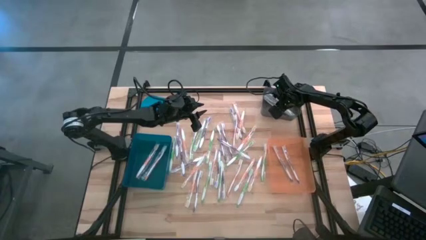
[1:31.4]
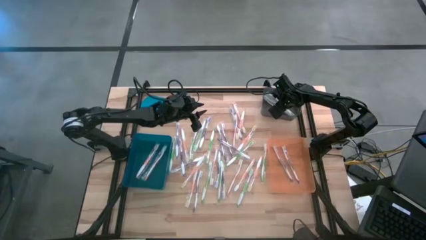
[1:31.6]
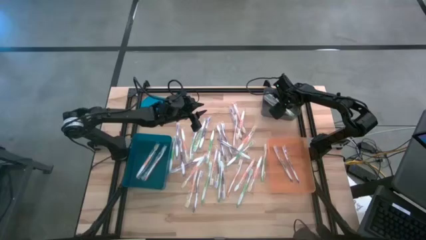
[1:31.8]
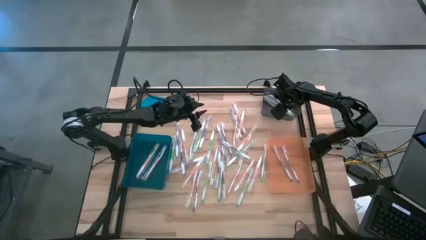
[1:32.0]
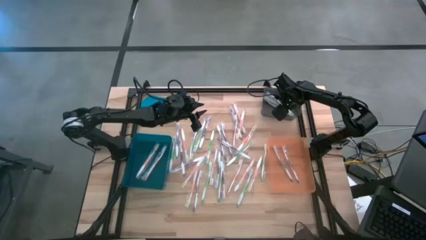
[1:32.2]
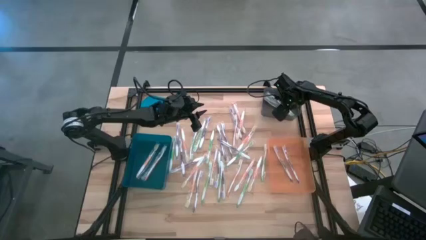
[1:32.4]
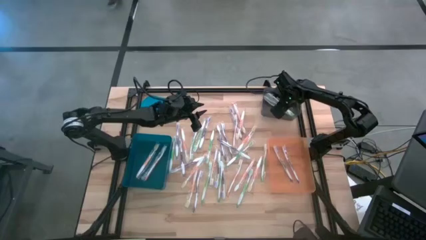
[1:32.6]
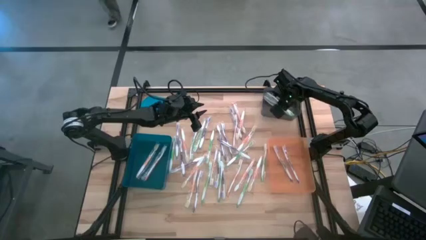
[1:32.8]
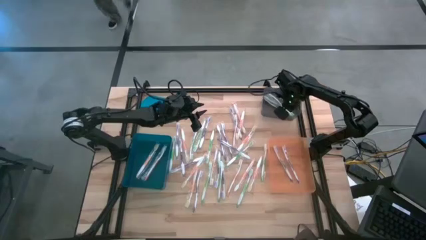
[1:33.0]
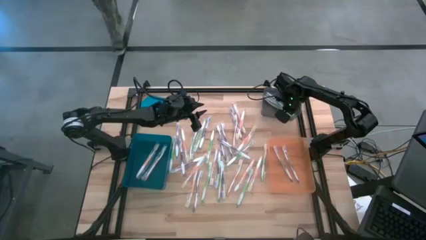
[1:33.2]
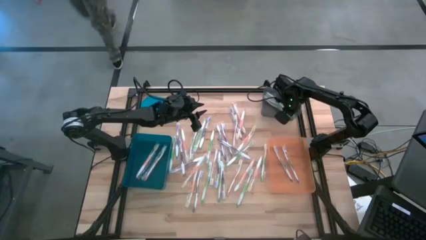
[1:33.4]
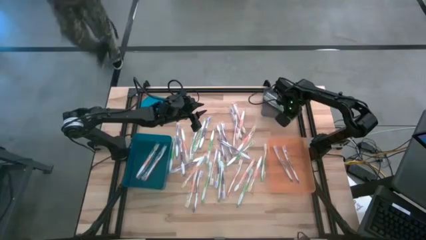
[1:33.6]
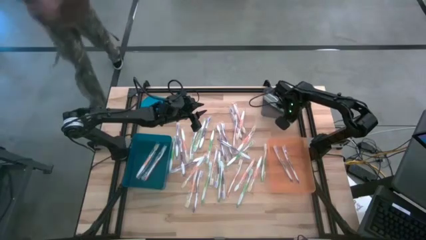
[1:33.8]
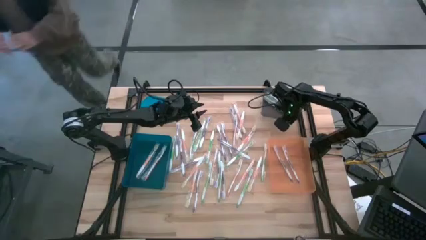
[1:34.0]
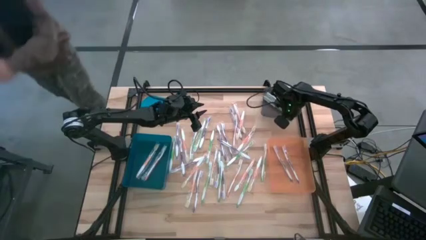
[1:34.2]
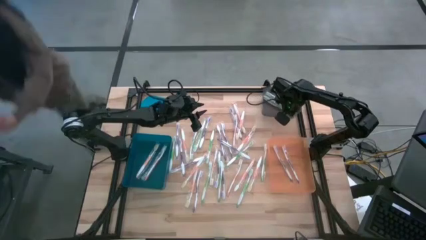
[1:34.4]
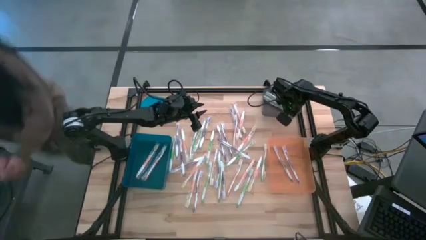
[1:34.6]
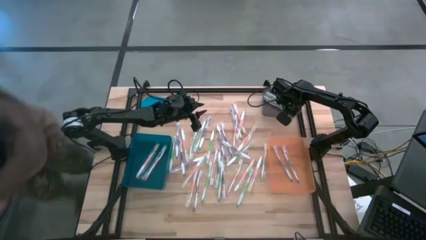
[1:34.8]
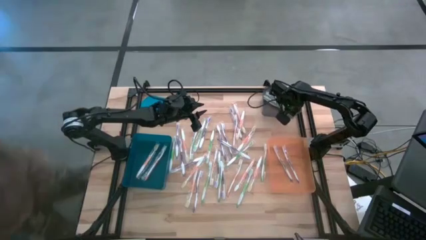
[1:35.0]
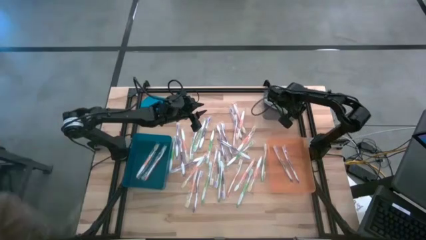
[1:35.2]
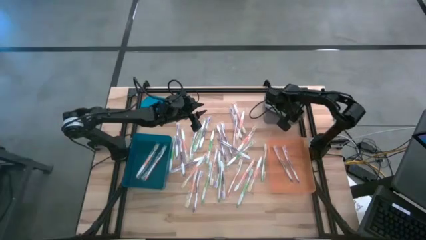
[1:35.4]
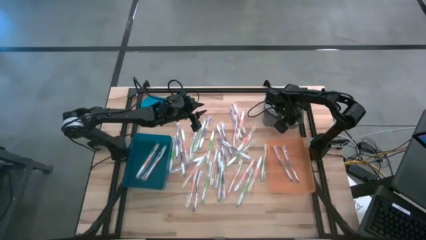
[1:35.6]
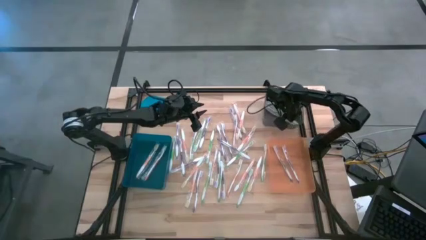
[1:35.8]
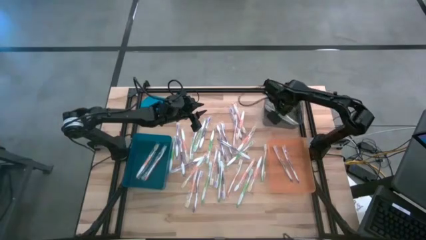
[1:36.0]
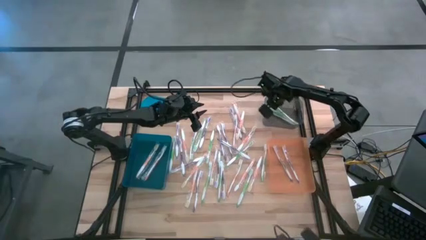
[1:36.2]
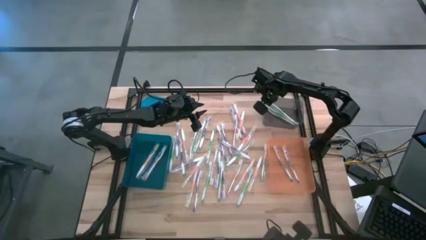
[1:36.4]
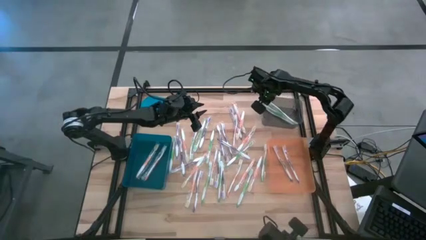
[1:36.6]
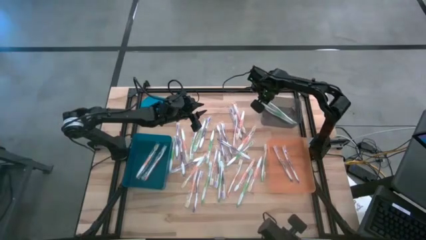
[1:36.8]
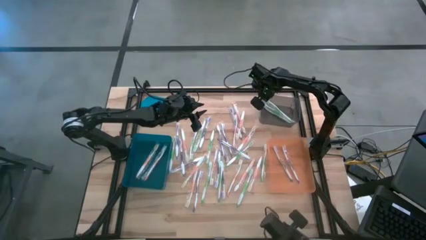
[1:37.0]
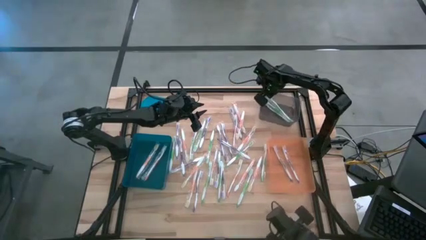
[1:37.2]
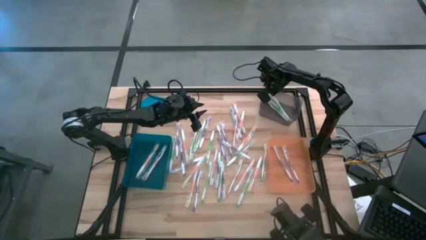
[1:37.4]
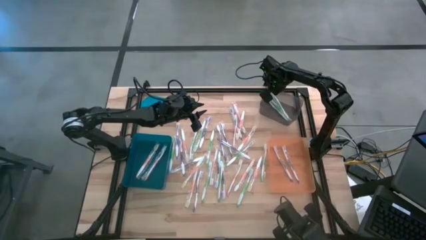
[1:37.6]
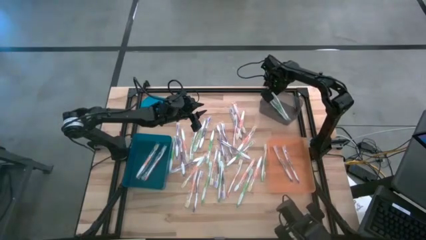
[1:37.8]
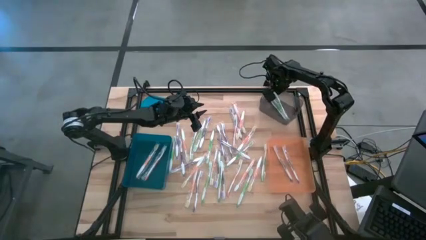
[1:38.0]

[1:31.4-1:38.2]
Task: Pick & Place Toothbrushes
Adjust the black bin

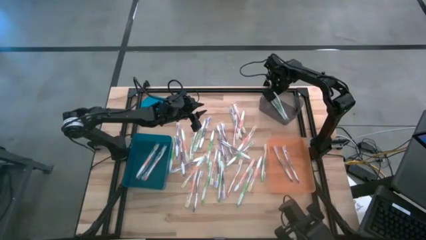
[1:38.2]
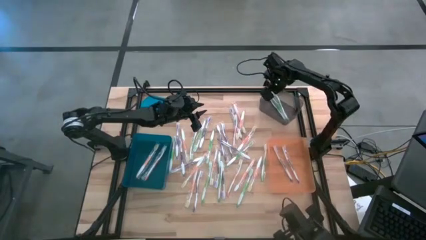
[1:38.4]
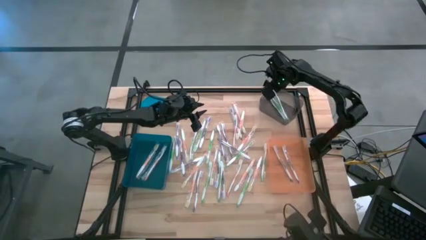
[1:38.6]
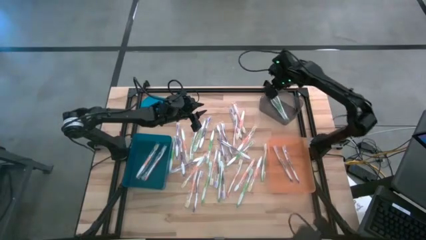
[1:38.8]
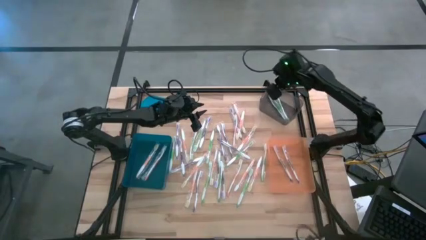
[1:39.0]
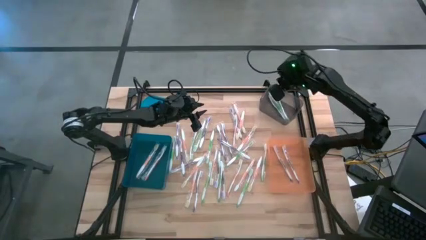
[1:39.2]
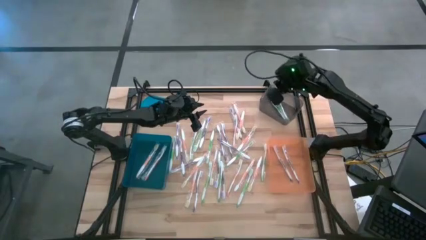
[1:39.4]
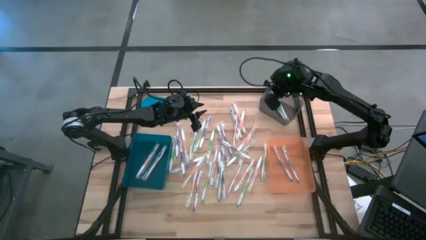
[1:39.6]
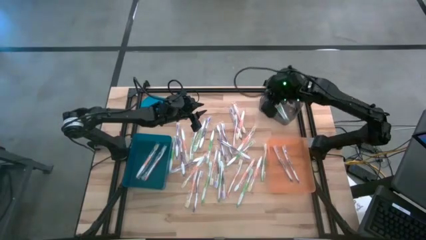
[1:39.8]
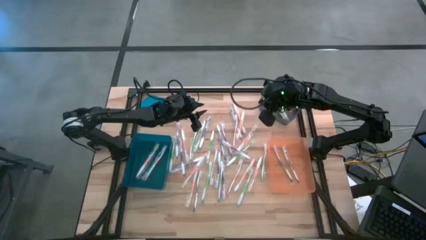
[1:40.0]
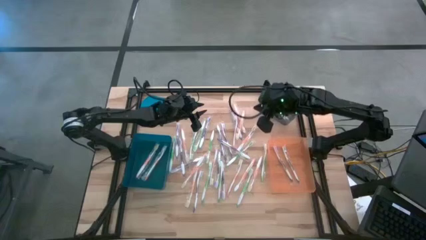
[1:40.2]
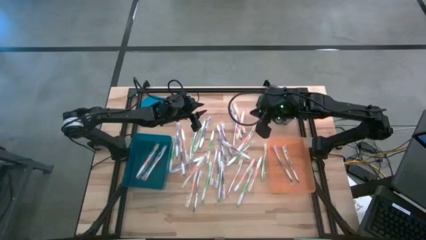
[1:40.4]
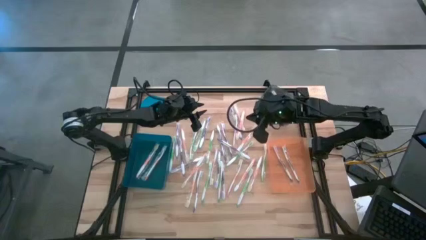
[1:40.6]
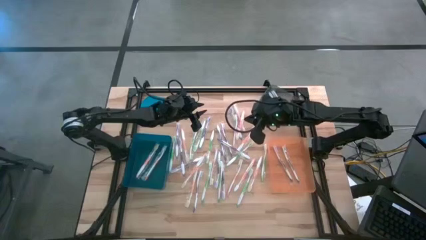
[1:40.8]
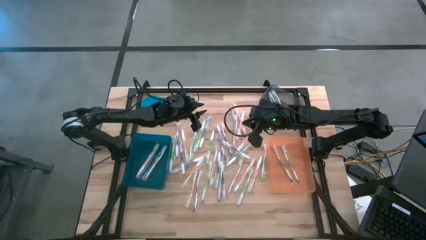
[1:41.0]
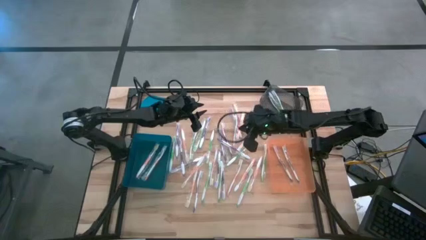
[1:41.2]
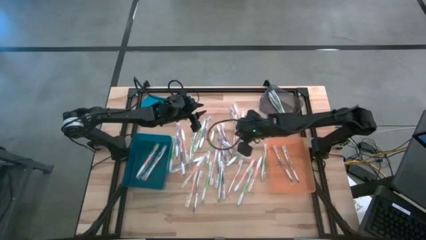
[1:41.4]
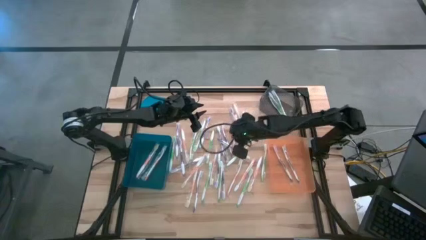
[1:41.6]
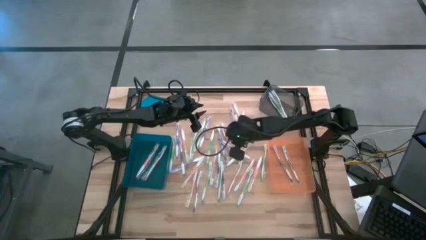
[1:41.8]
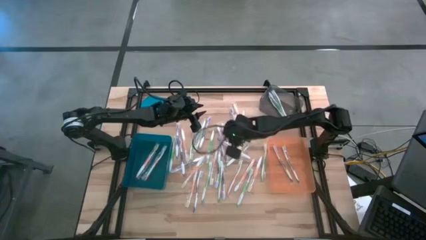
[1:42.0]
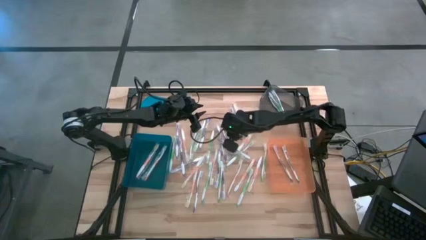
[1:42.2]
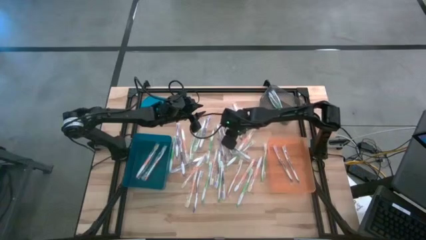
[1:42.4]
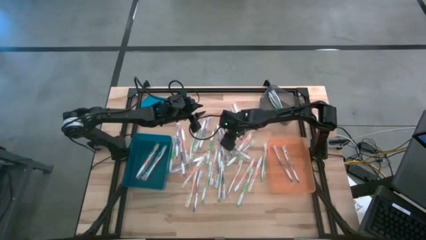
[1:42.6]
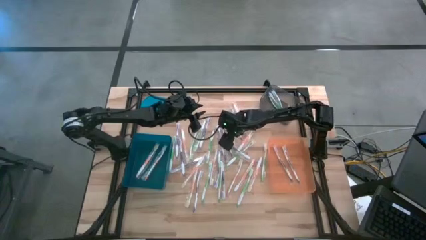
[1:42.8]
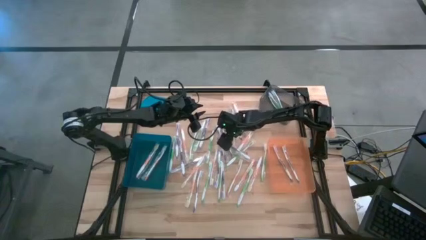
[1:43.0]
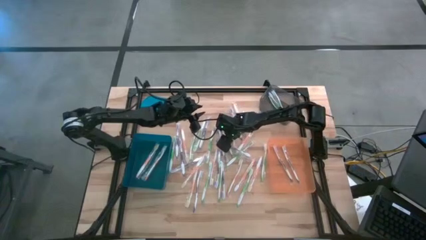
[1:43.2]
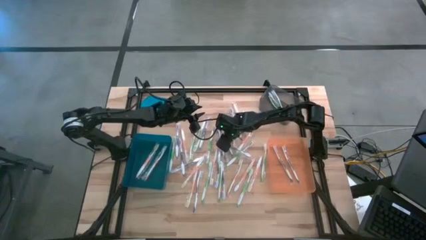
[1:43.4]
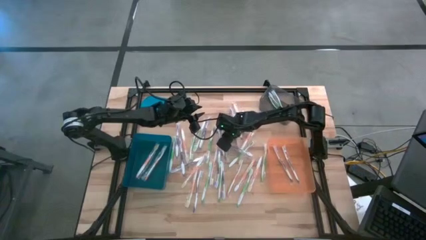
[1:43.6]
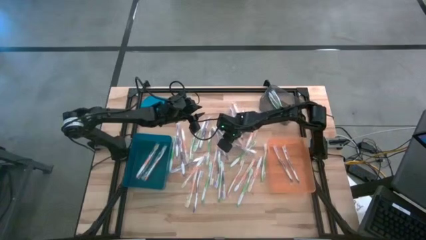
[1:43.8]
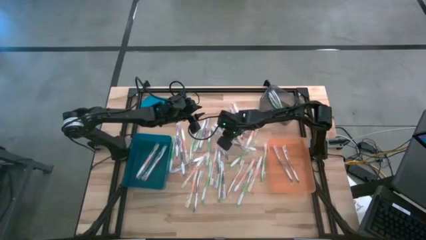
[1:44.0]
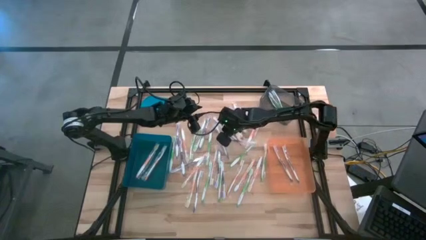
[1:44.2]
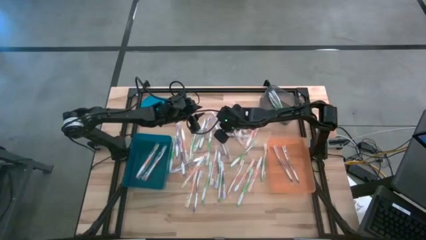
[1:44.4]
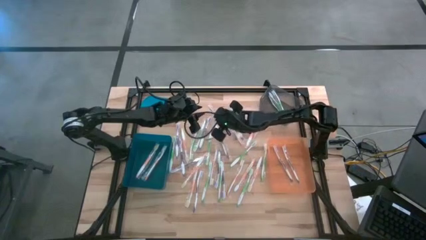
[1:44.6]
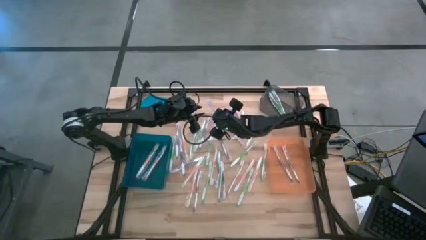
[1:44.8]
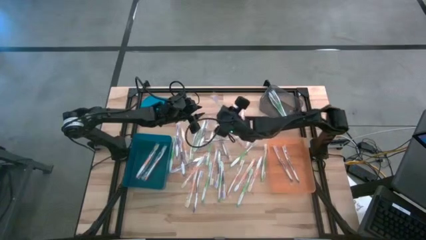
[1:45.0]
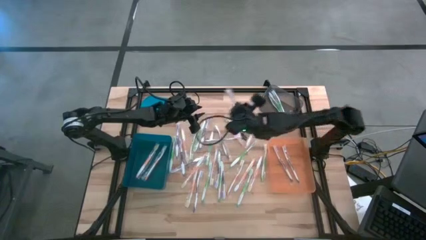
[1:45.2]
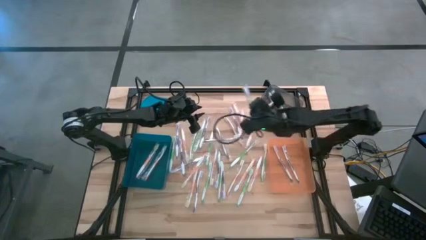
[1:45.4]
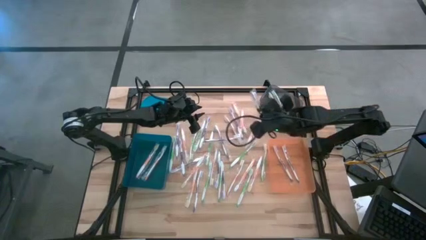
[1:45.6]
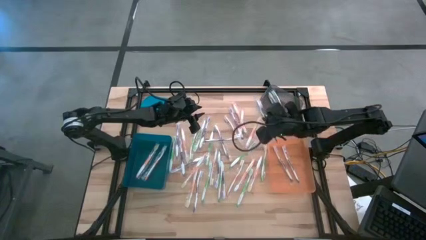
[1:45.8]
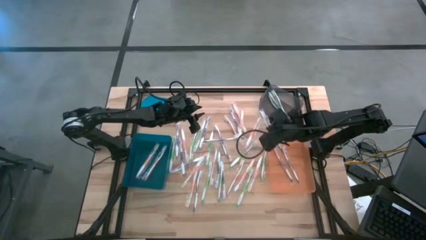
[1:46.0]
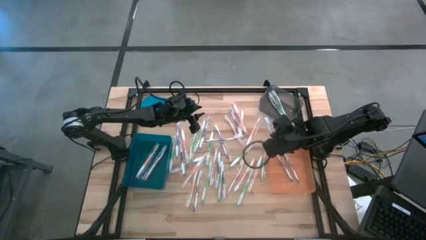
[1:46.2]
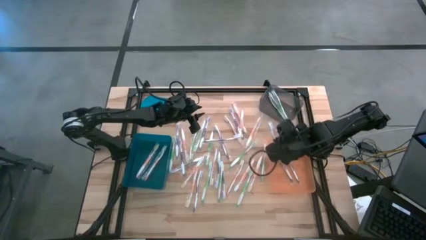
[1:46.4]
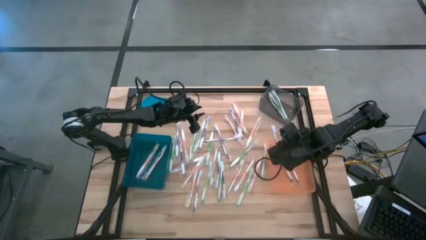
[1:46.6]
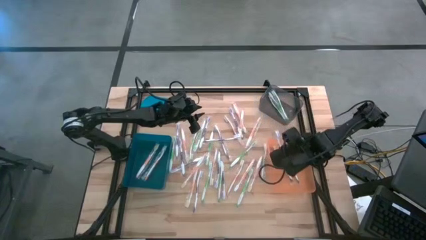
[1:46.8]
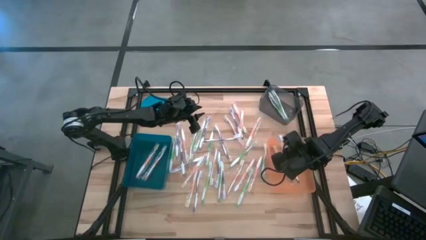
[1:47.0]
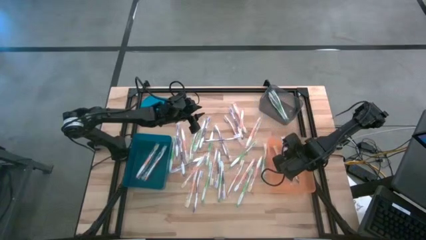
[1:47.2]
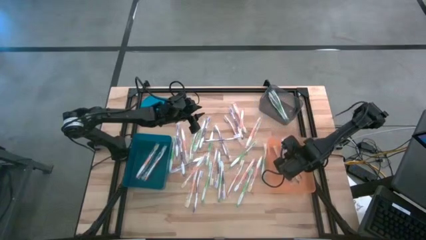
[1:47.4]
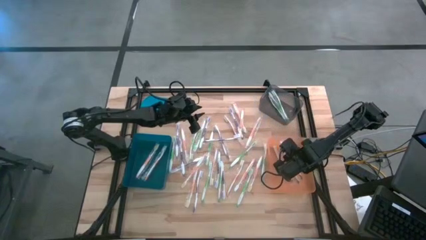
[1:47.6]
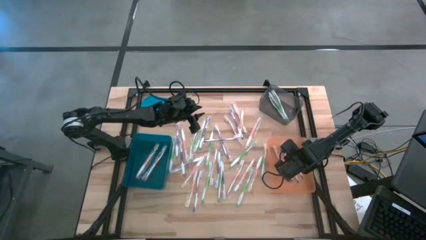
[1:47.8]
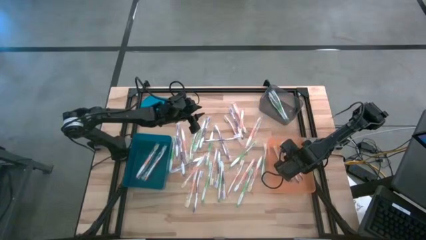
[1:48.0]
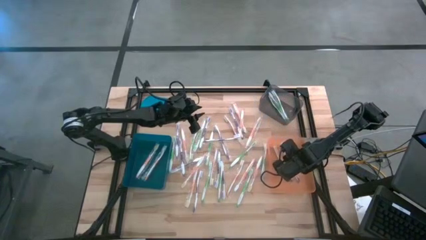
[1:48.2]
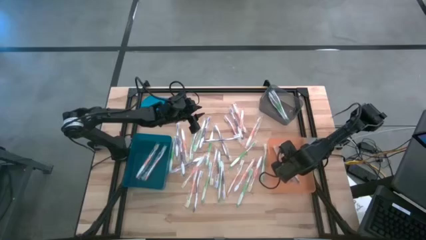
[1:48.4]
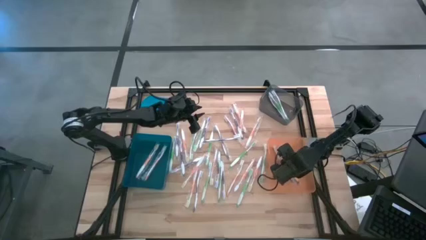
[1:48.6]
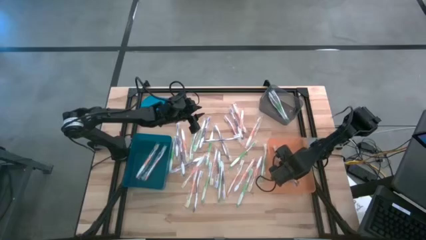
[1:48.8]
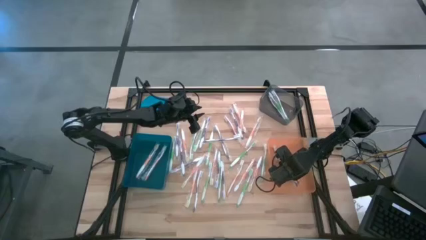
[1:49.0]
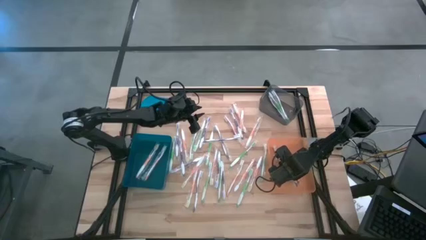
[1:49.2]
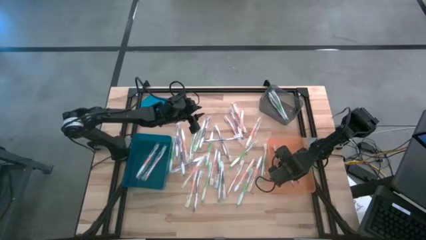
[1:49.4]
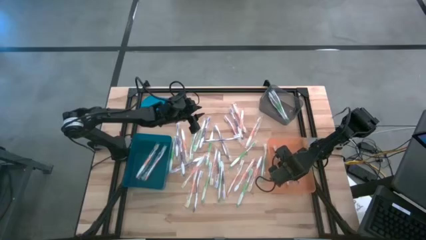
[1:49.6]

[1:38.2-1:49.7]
Put the purple toothbrush into the orange bin
